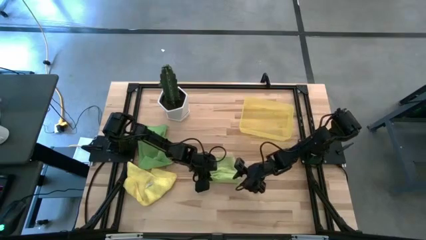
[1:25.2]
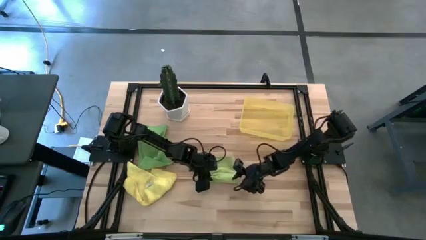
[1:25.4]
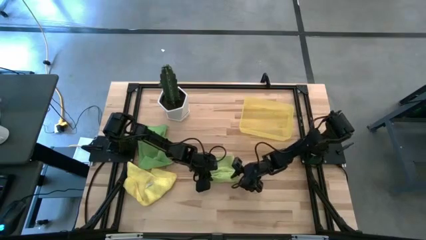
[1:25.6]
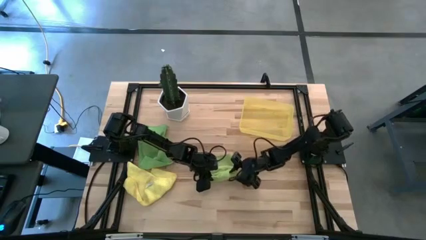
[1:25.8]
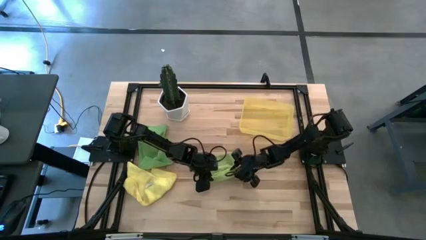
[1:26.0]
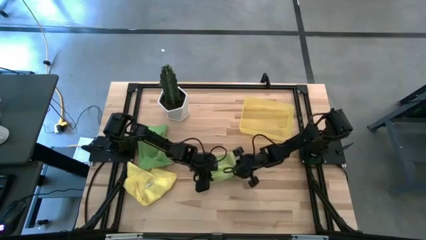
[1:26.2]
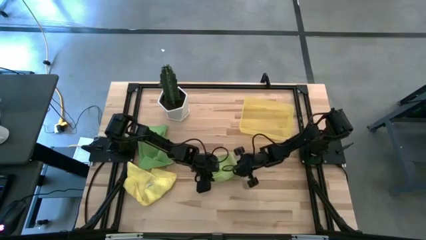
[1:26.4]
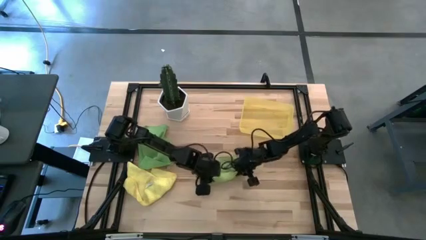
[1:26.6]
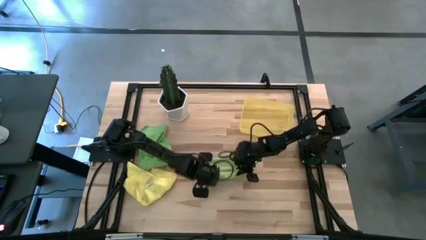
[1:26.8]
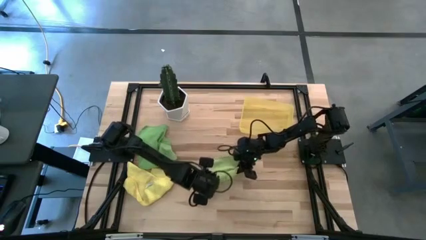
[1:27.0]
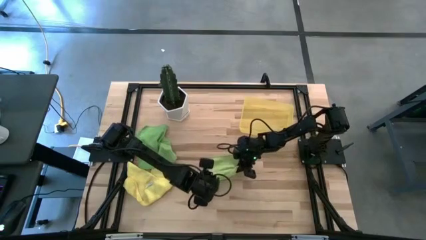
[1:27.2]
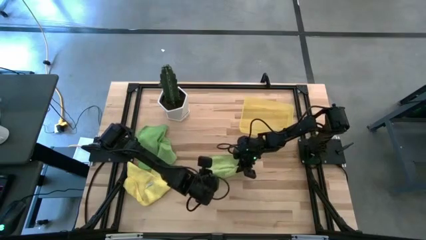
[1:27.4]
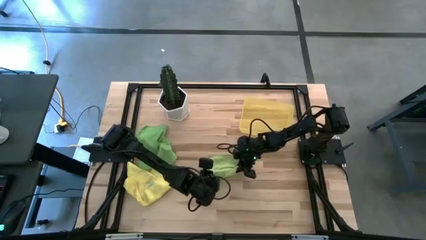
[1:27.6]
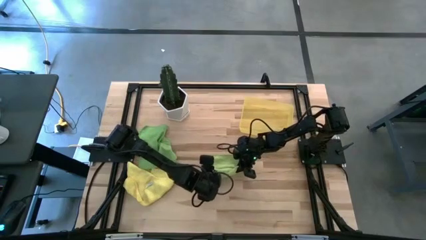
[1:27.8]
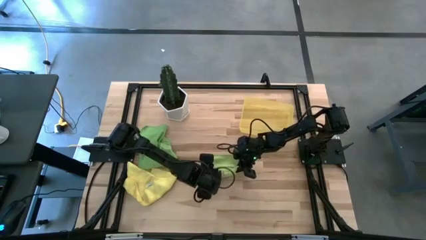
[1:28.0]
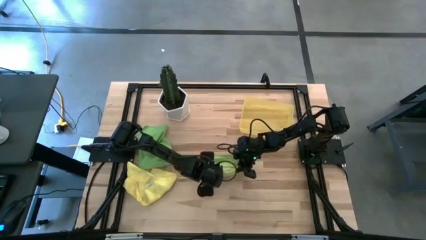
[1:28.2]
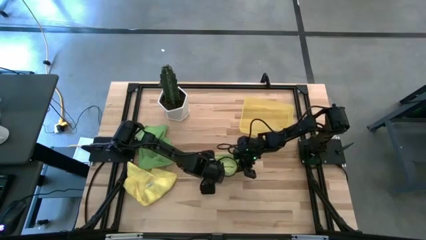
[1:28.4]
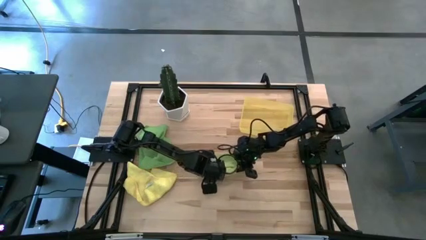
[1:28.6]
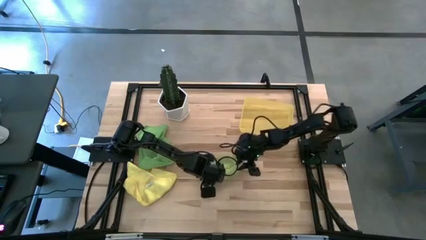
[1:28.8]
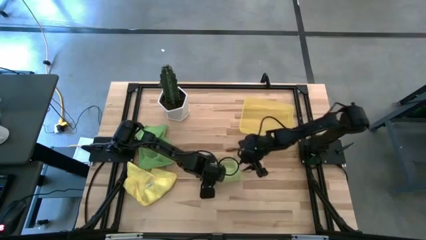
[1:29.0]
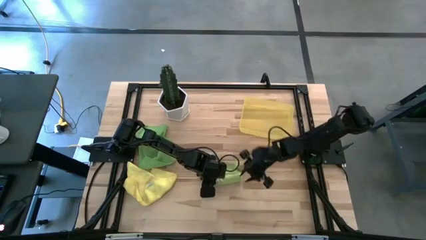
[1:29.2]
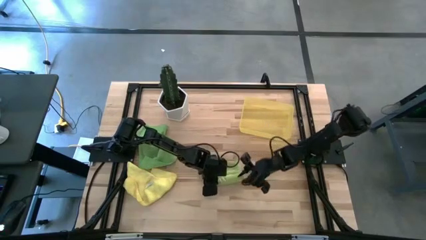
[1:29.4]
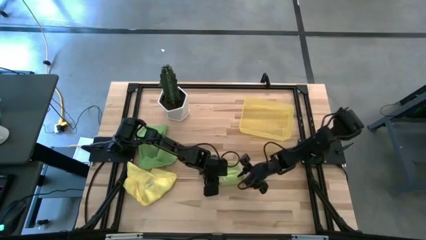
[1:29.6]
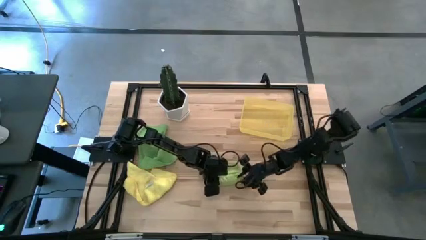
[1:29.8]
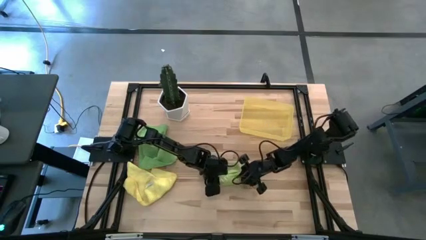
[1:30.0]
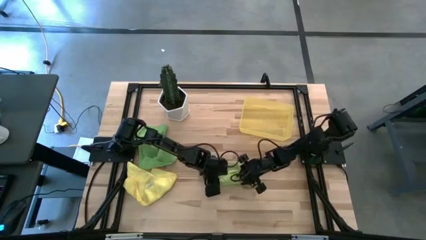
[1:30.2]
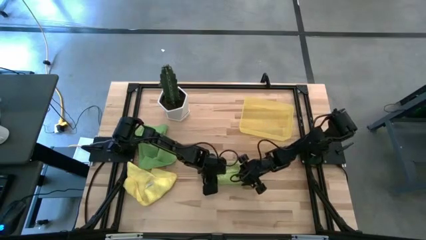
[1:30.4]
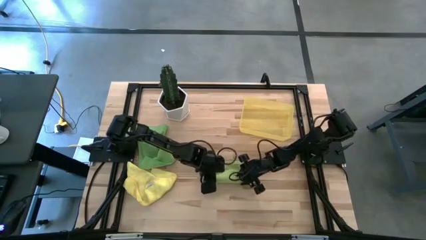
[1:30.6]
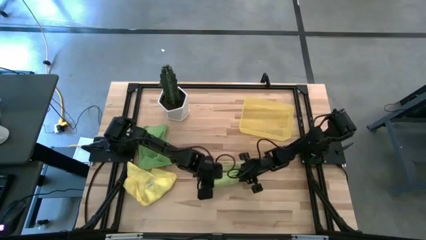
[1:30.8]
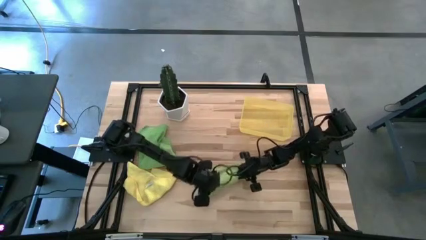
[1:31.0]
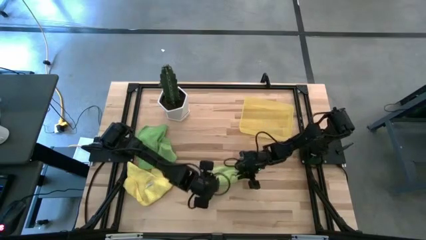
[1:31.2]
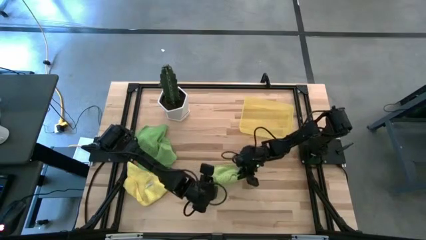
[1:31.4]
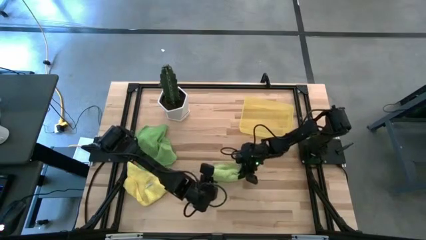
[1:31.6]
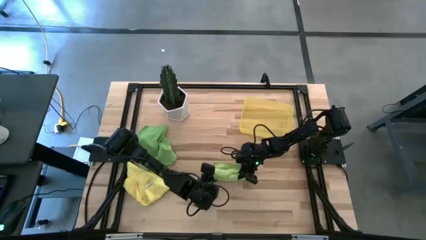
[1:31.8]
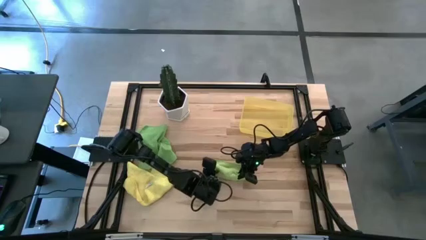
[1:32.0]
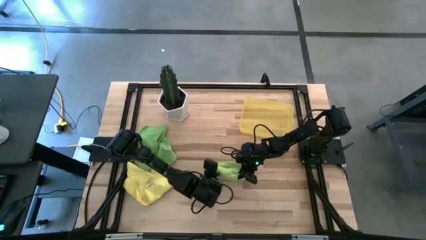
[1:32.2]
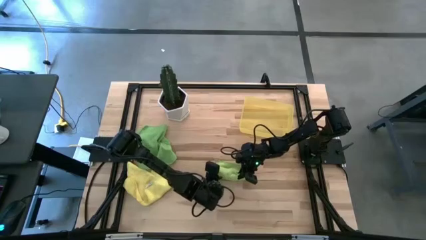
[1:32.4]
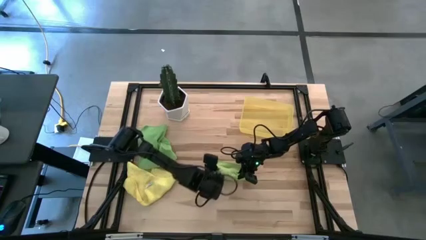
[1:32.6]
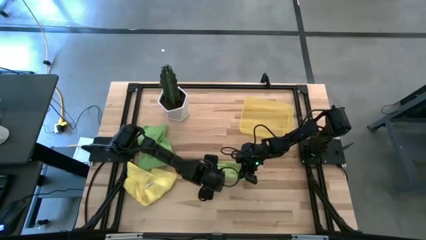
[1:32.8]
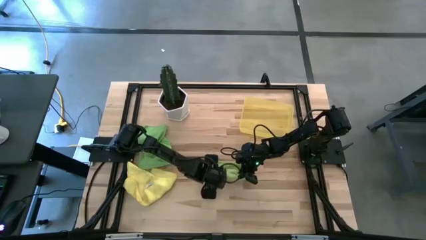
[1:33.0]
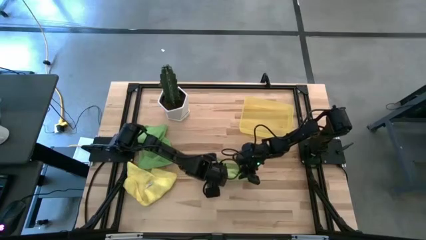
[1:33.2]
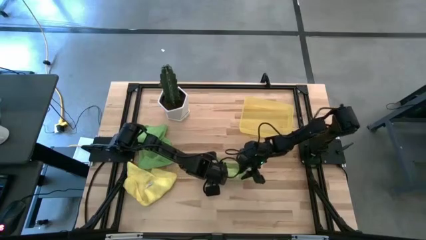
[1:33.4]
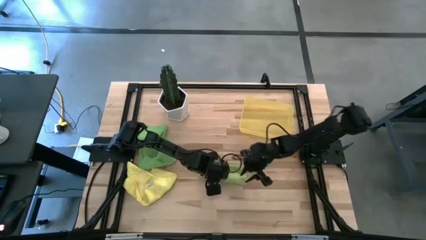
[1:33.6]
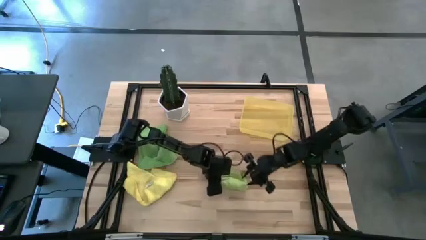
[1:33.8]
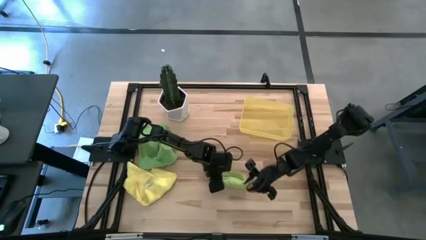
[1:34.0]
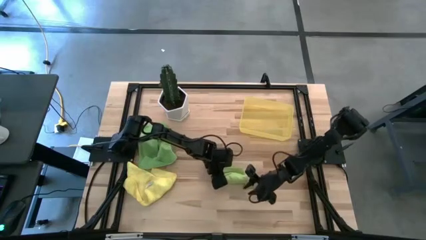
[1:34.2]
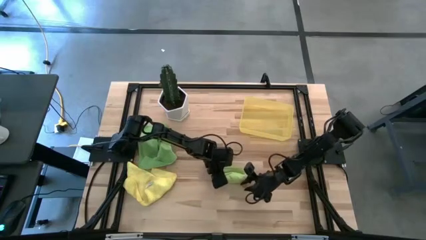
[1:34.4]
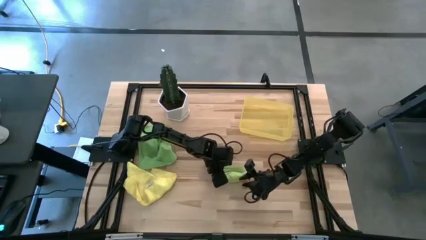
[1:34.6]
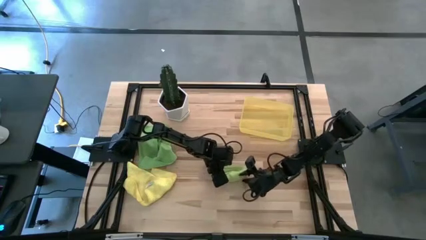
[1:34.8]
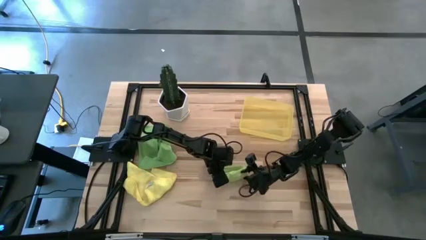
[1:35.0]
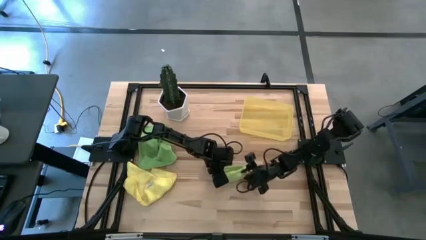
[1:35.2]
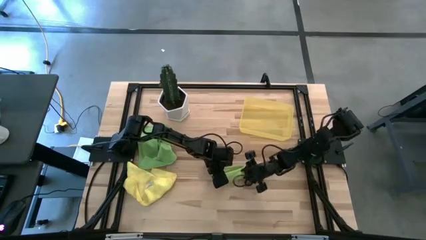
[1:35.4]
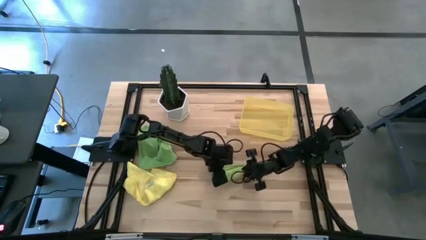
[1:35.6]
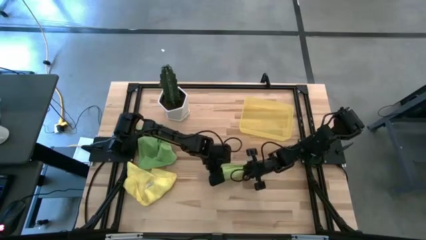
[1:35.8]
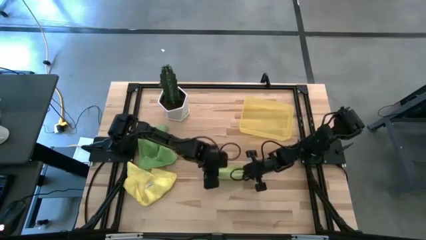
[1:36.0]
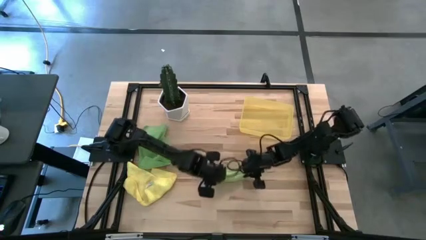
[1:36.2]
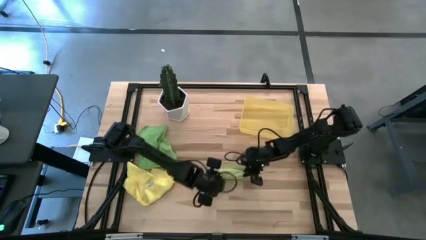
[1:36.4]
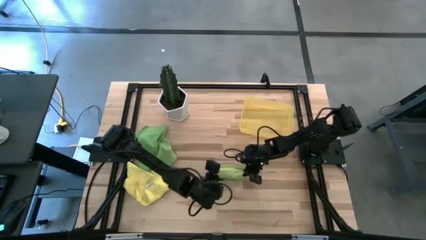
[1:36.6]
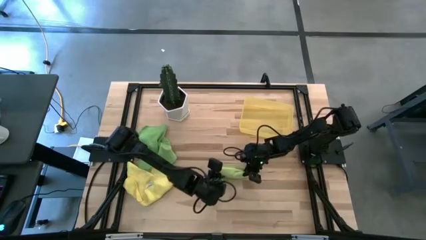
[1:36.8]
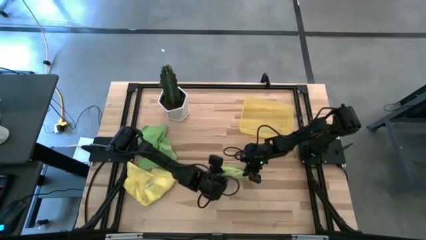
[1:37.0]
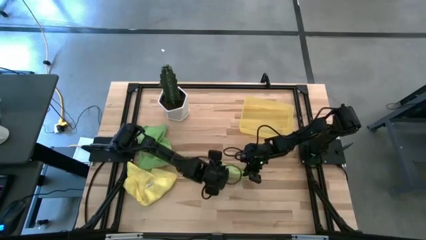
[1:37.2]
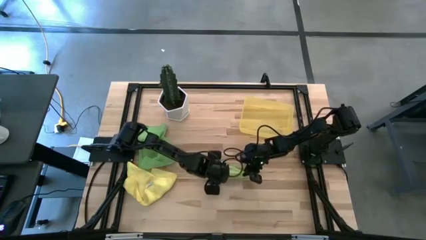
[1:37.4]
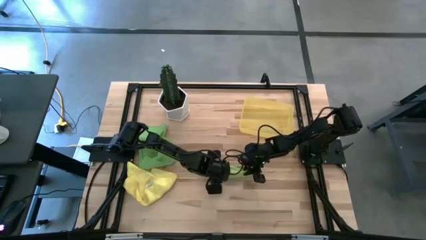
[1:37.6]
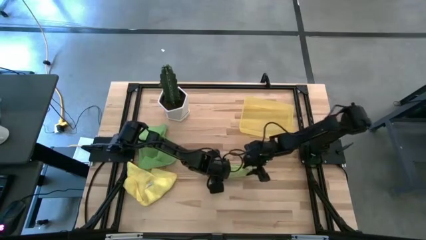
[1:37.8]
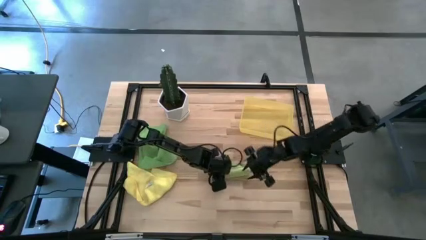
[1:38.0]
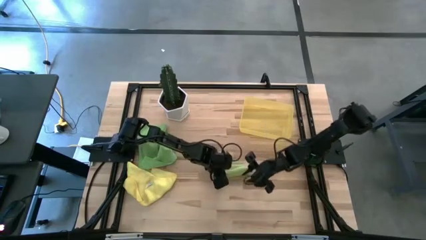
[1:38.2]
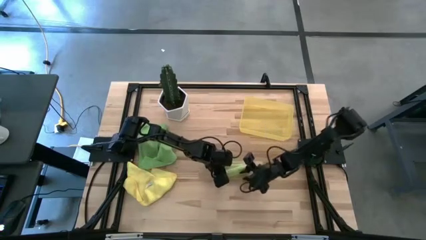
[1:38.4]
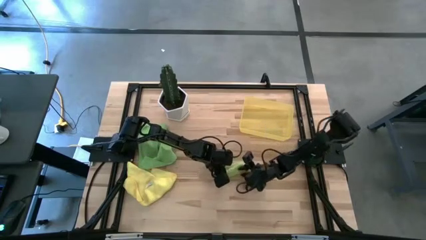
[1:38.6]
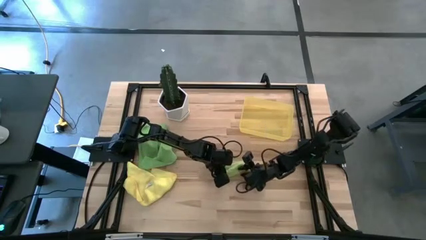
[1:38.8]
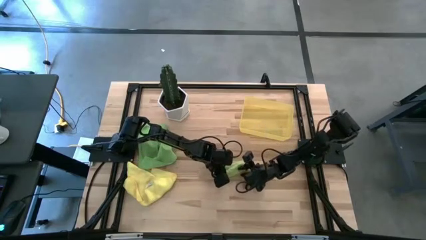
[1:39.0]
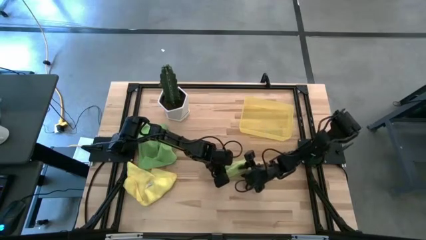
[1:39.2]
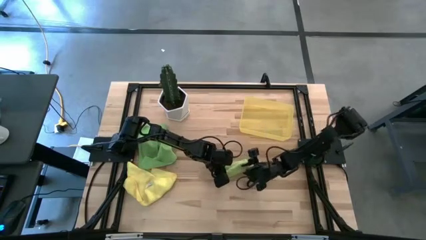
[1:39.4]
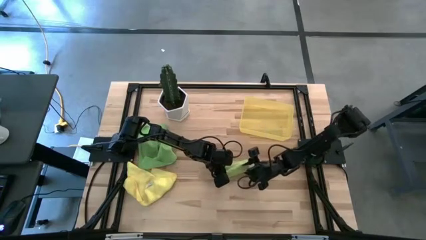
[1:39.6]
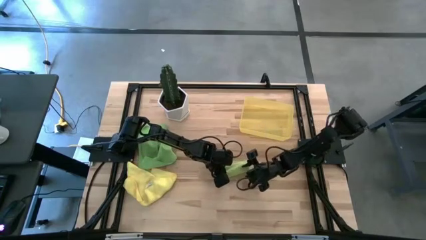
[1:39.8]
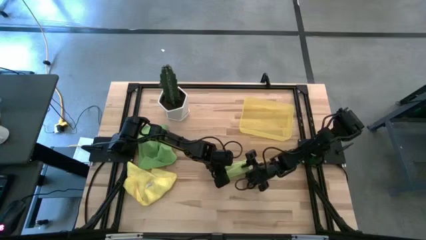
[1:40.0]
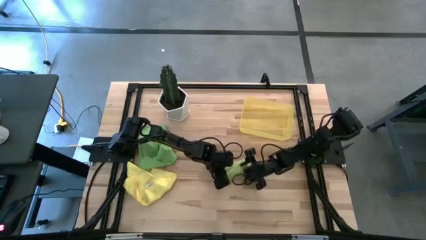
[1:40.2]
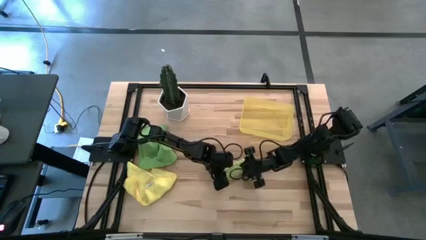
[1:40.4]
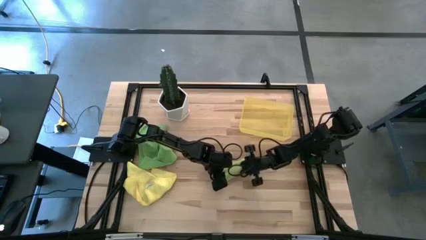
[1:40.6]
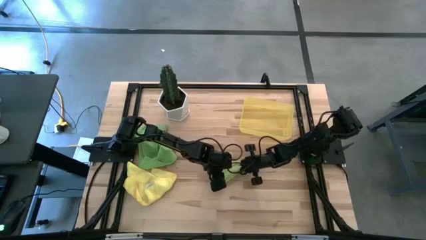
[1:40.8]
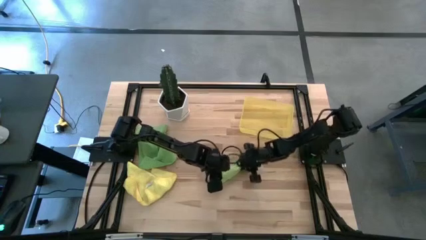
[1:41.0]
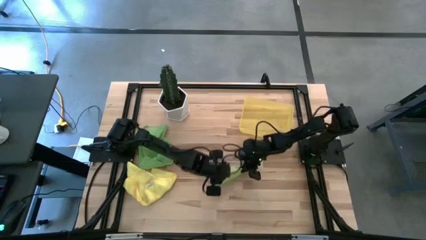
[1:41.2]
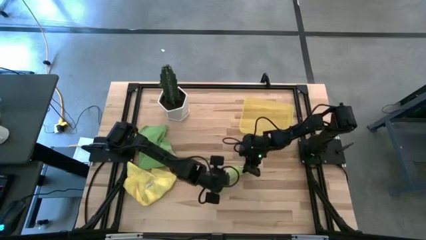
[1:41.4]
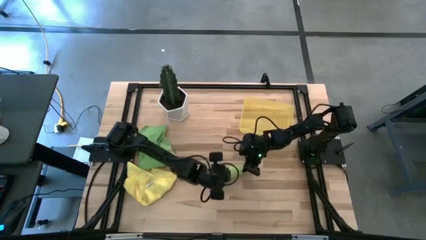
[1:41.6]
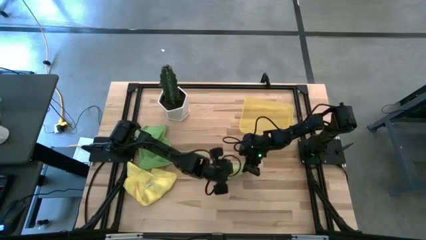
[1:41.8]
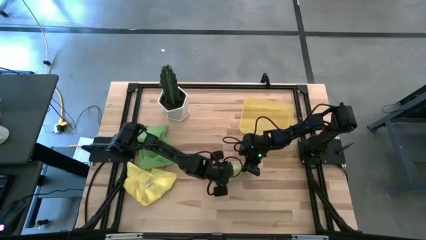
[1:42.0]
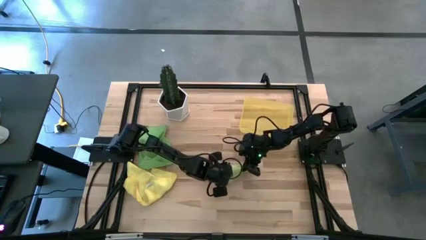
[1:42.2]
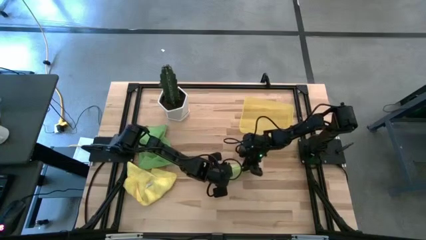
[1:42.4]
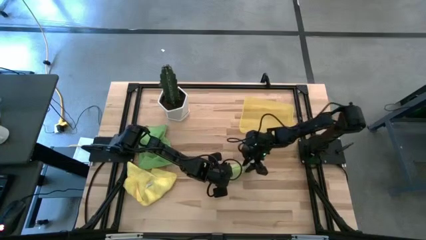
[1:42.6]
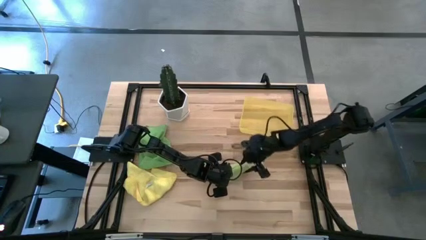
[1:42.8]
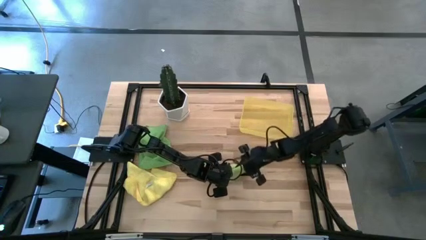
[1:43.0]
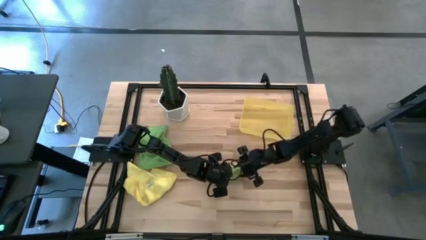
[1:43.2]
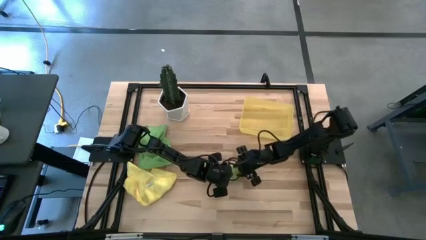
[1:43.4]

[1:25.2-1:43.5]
Task: Roll microfiber towels into tight, uniform cylinder then place into a basket
Roll the light green microfiber cloth
